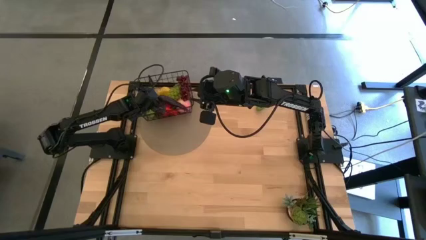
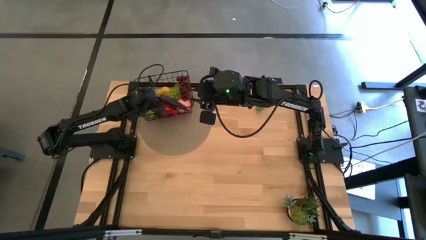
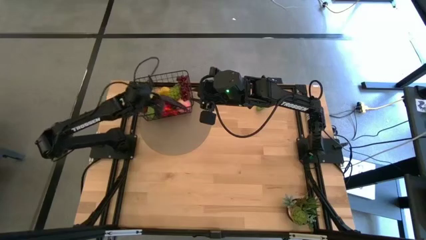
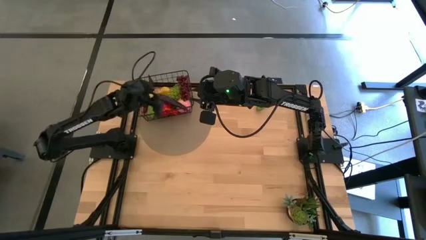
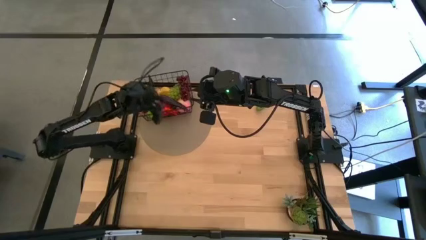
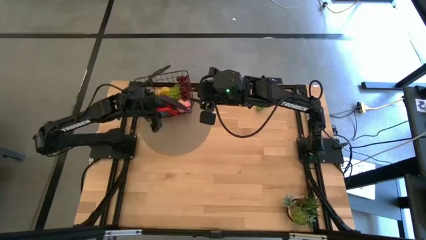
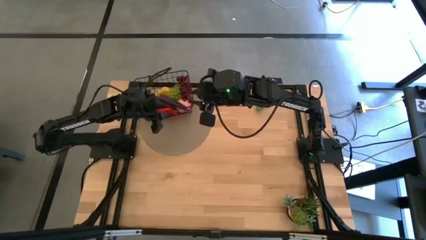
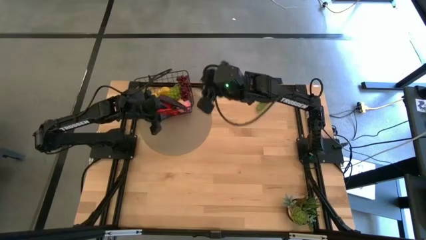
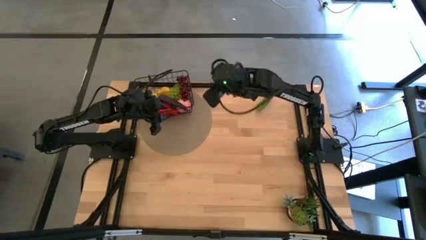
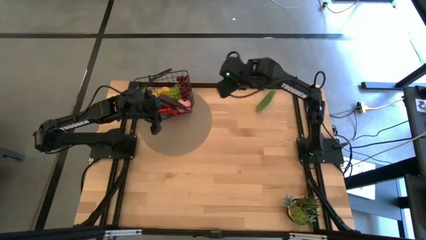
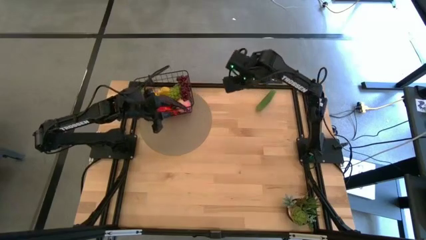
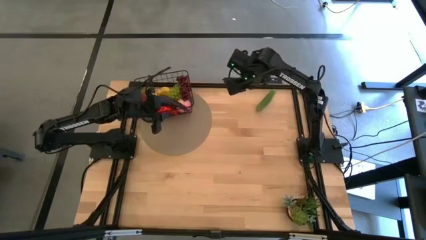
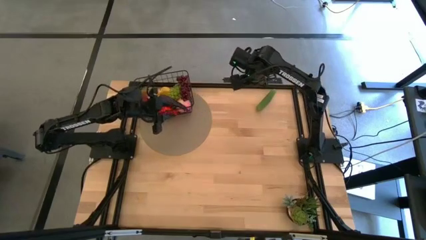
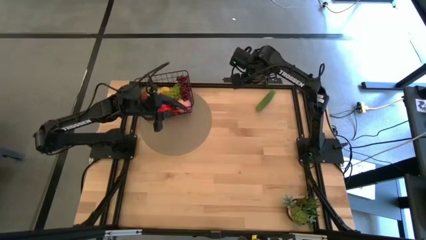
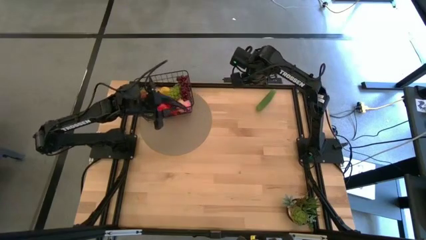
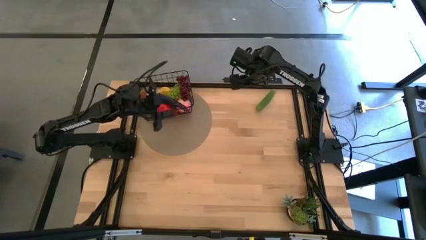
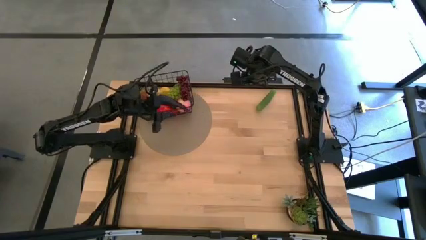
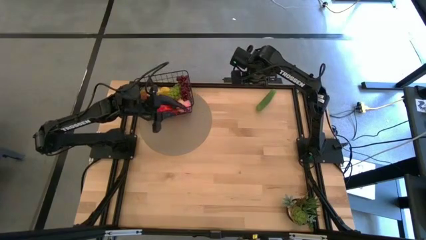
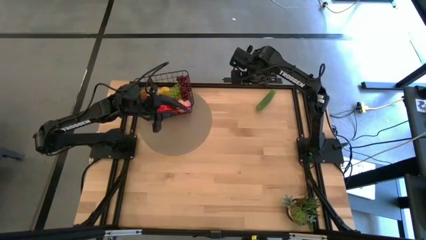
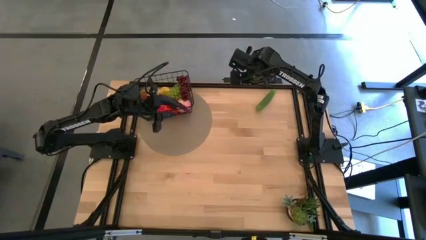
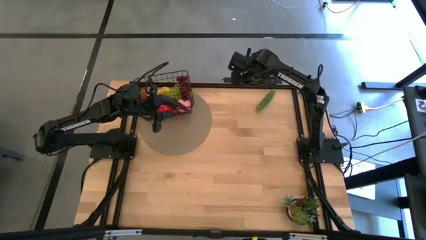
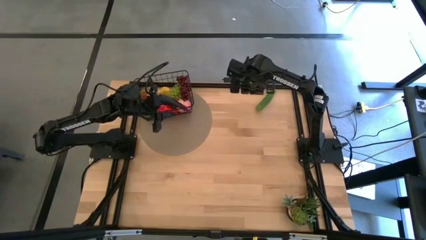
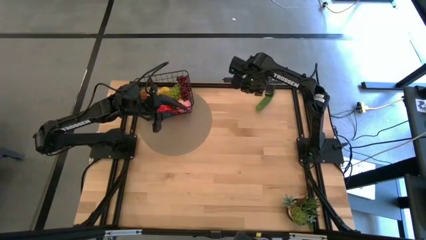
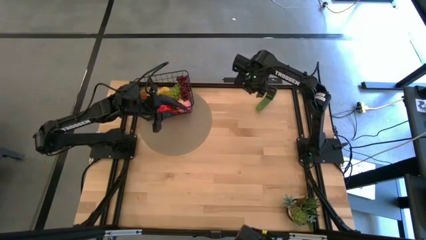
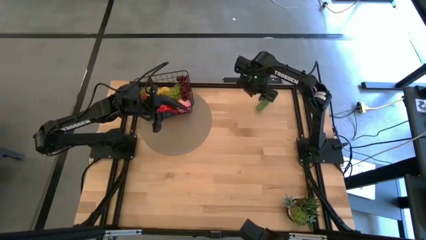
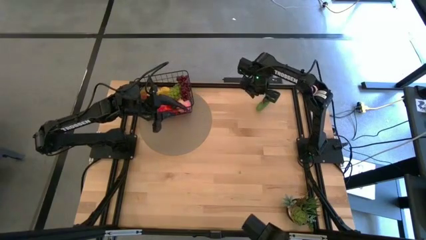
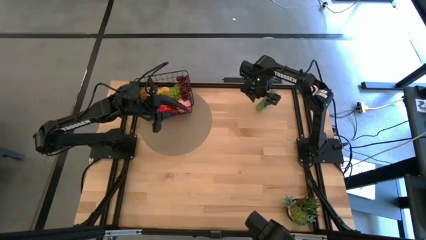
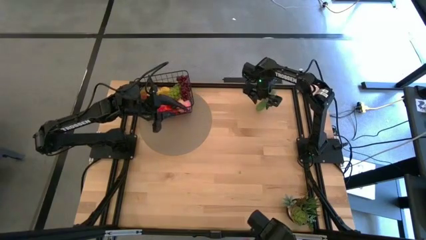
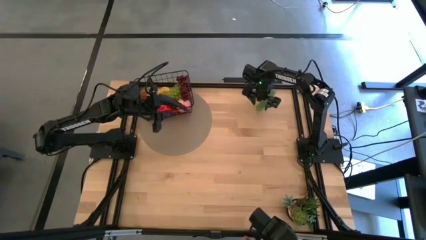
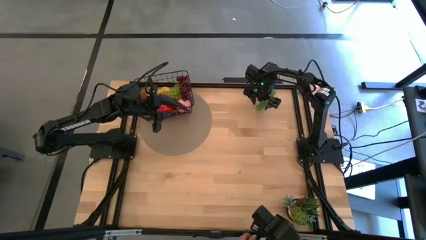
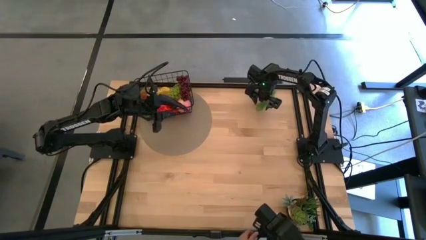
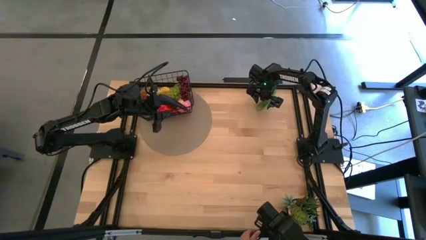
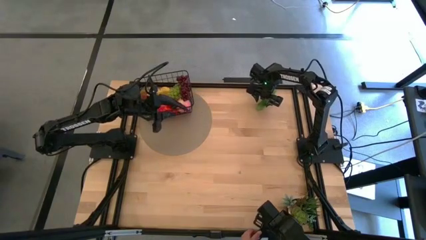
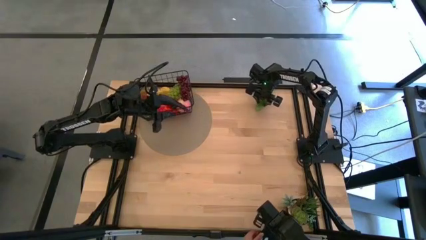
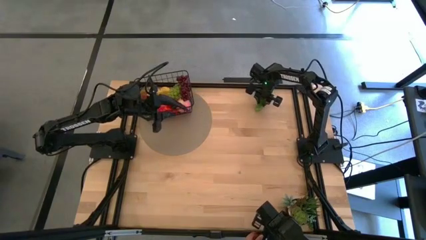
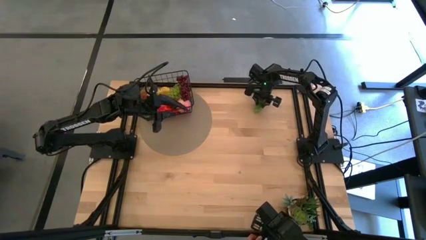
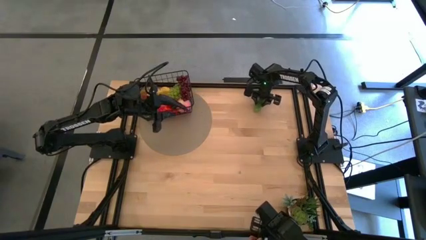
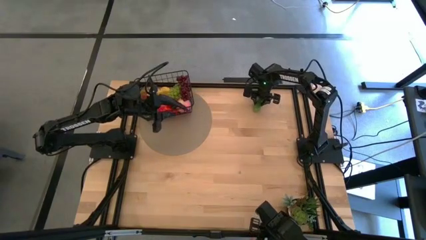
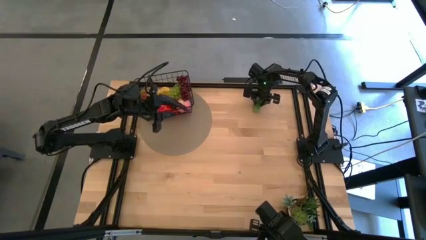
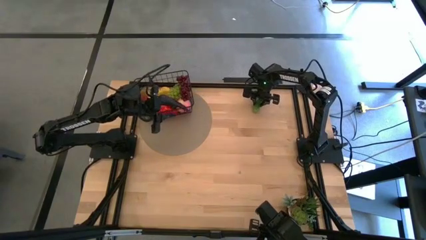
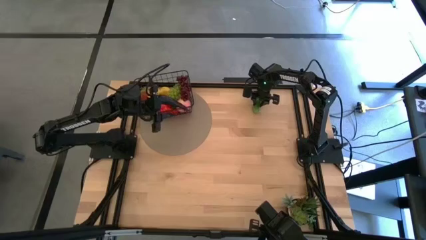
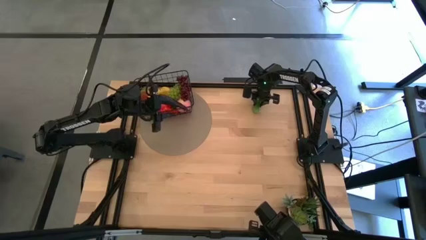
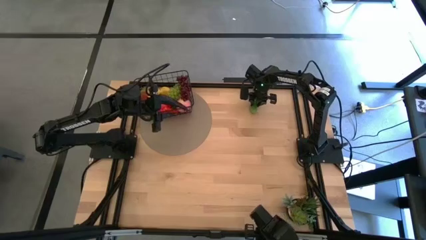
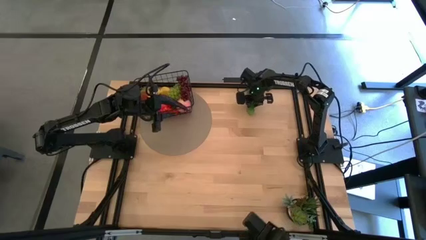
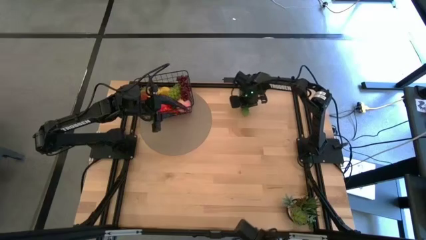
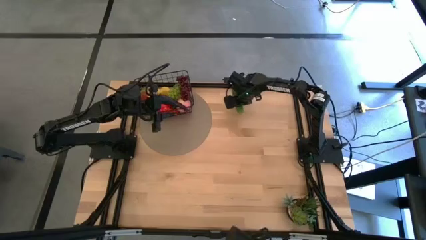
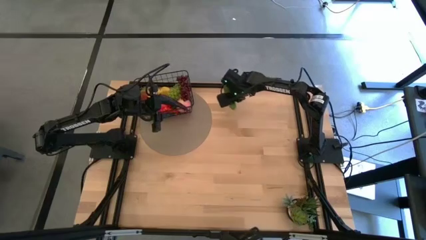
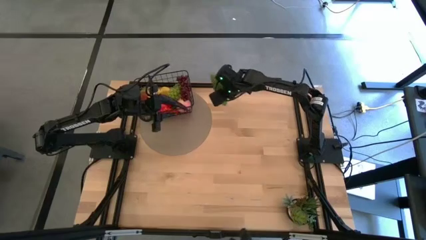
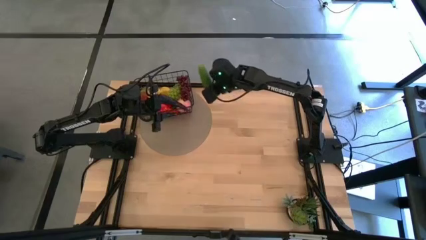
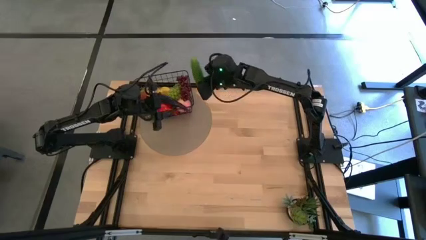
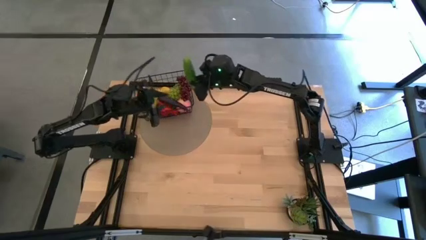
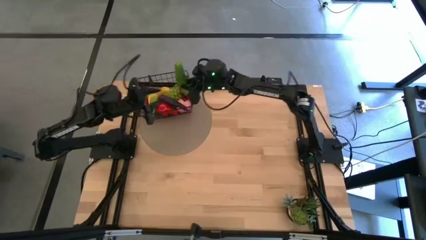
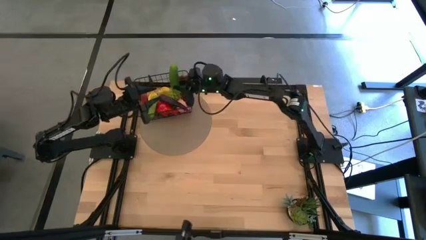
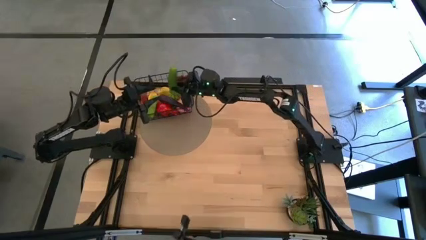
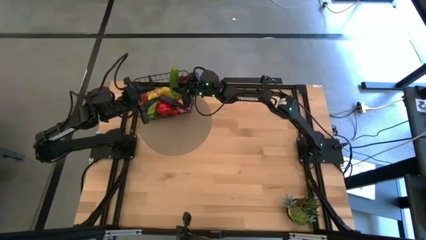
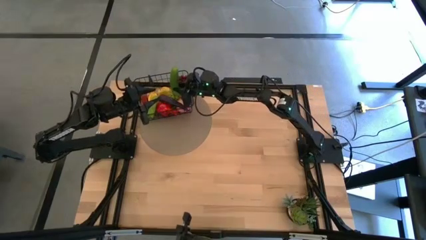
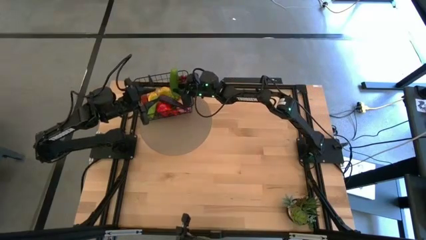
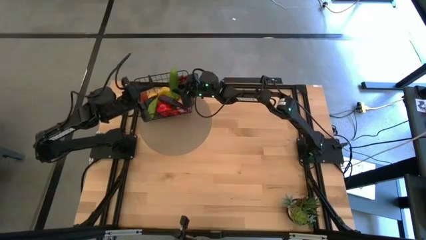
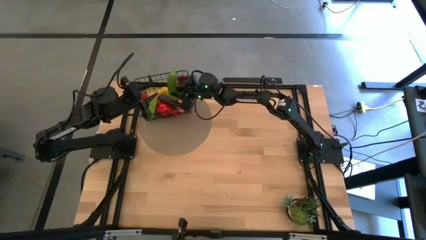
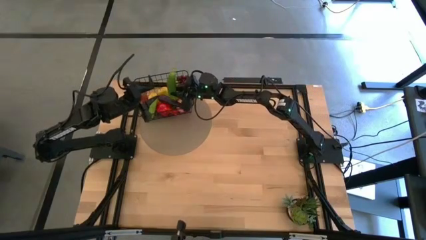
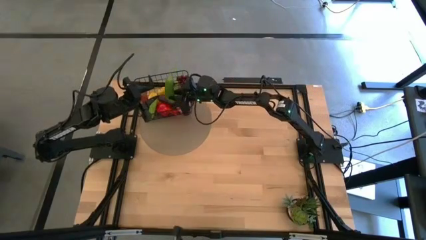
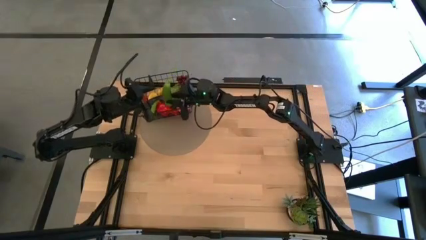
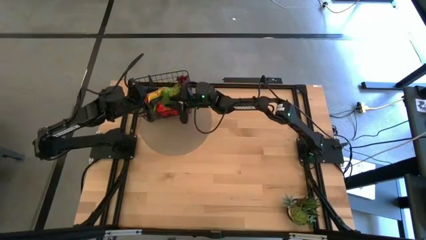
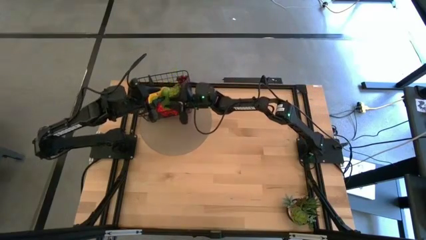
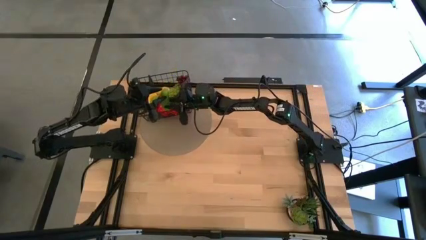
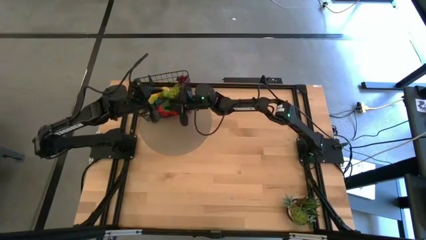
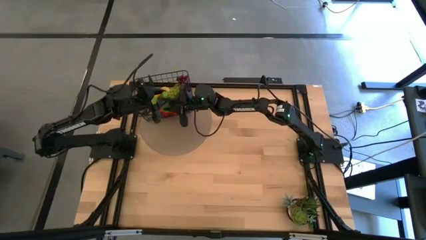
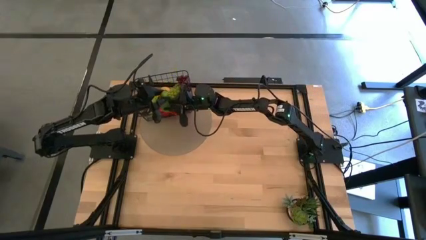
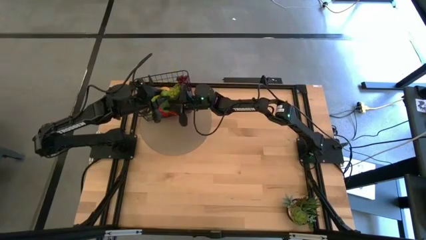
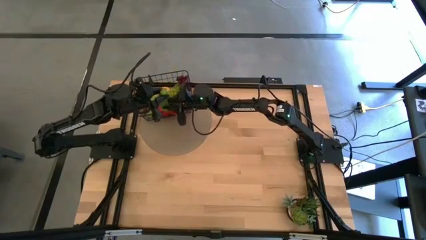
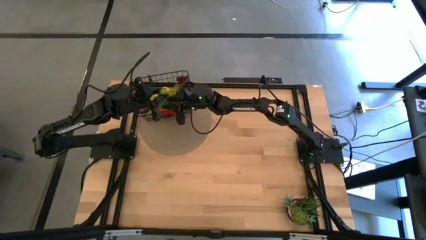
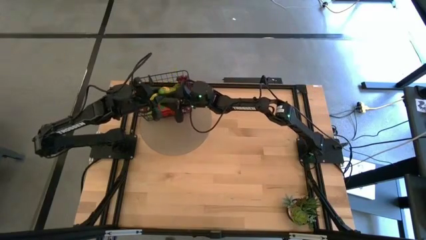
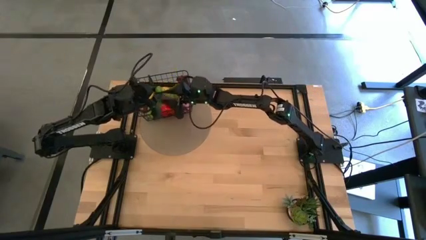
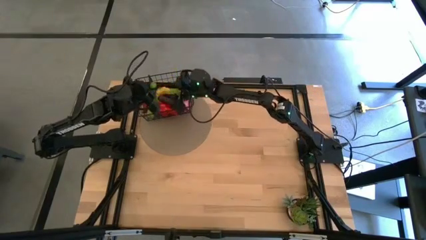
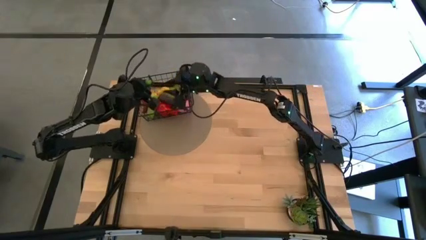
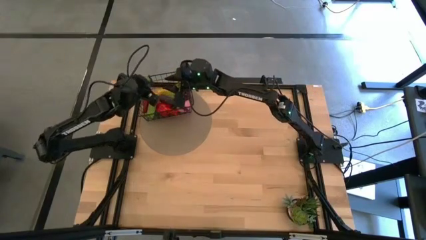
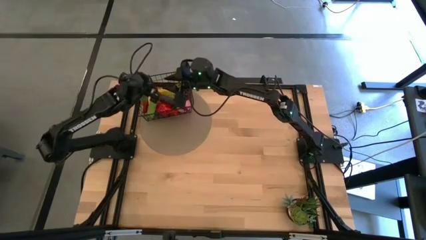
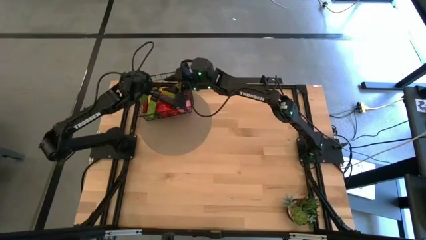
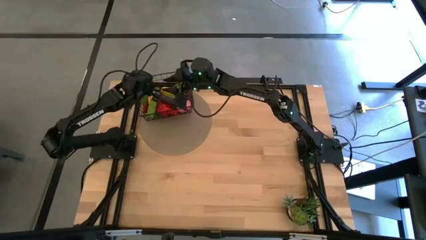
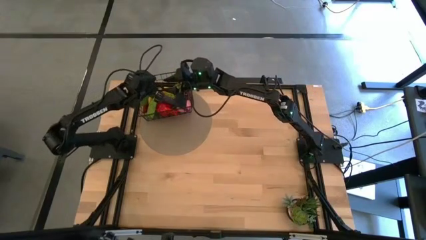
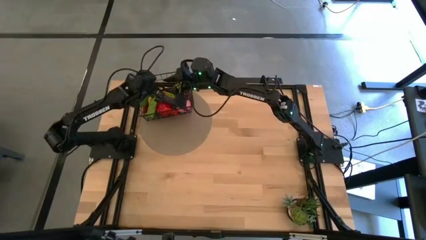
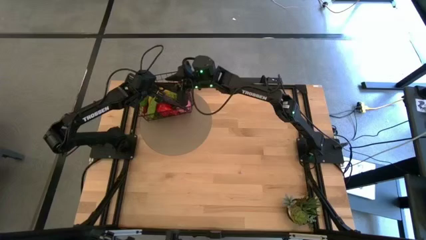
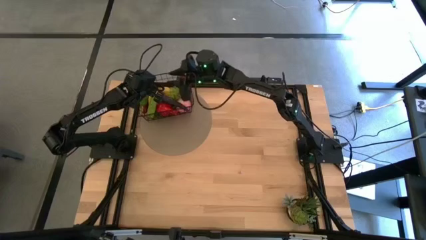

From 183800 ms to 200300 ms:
Task: Build produce basket
Put the green cucumber into the black wire basket
